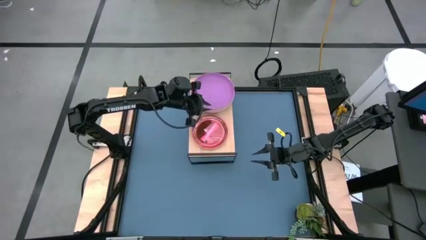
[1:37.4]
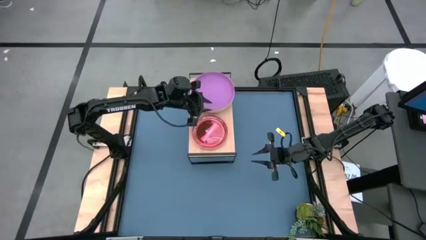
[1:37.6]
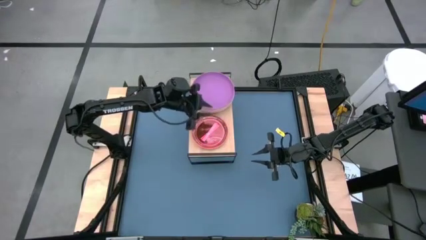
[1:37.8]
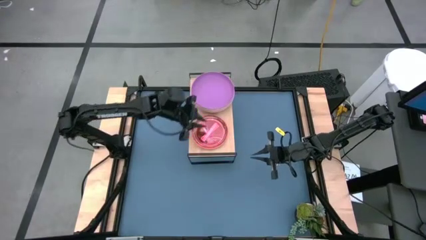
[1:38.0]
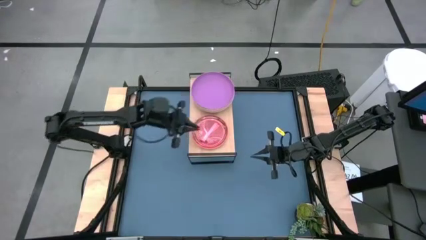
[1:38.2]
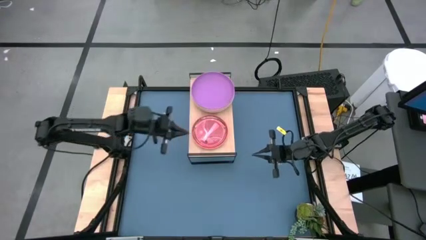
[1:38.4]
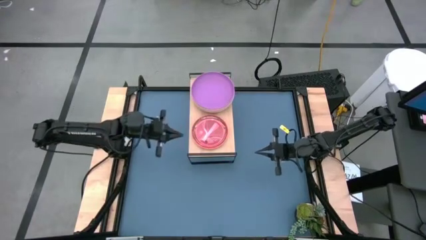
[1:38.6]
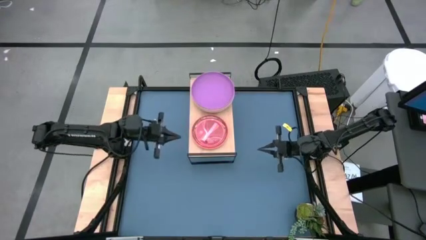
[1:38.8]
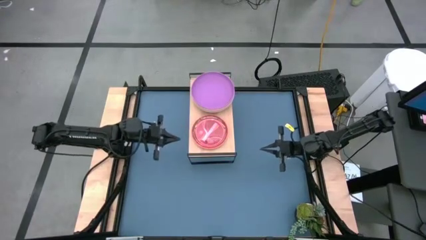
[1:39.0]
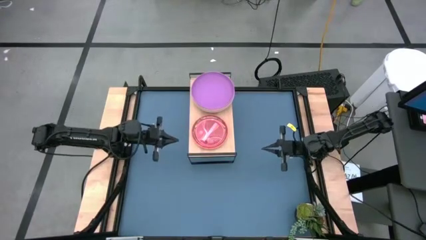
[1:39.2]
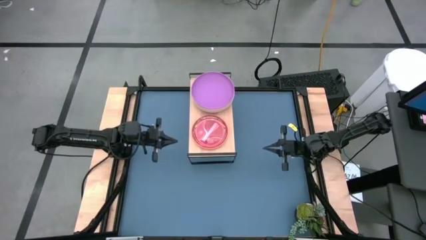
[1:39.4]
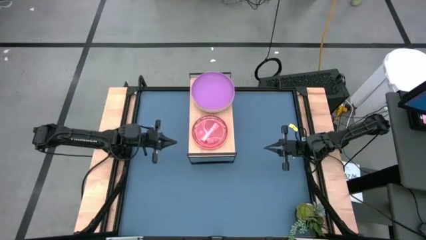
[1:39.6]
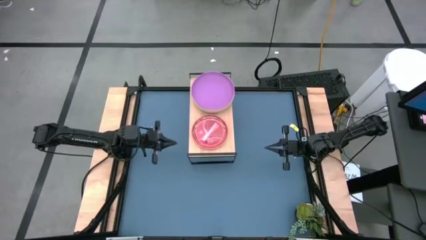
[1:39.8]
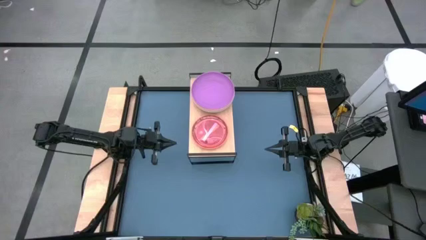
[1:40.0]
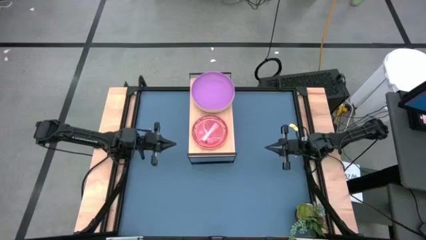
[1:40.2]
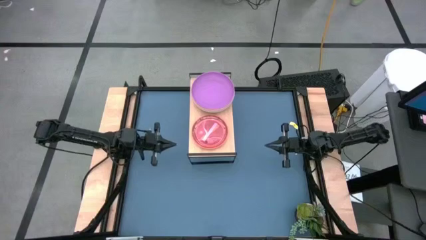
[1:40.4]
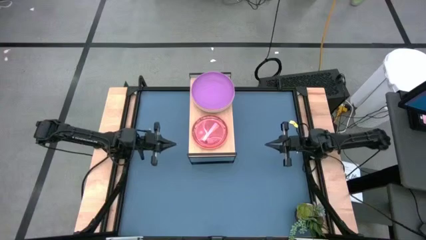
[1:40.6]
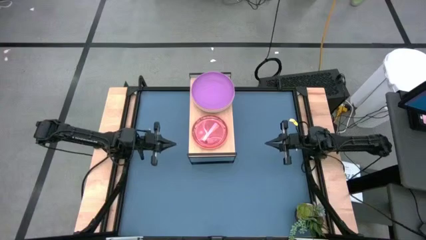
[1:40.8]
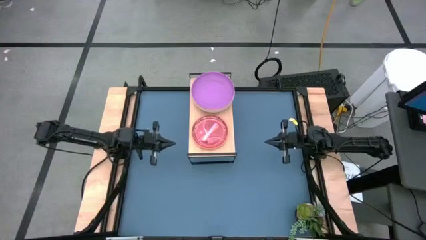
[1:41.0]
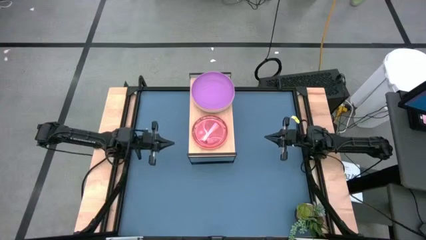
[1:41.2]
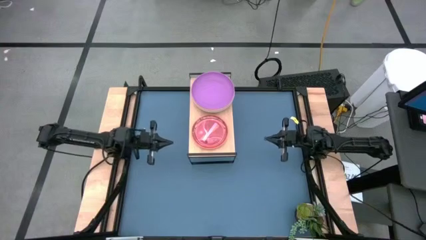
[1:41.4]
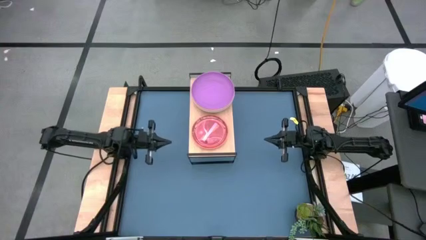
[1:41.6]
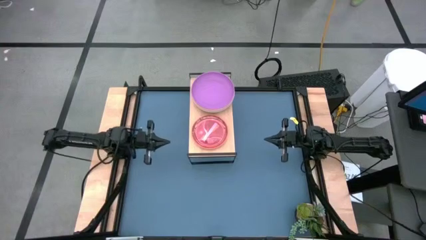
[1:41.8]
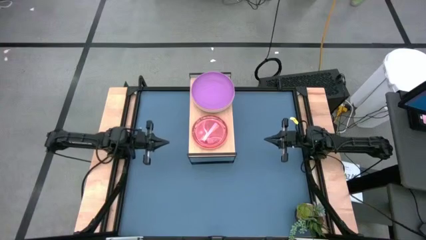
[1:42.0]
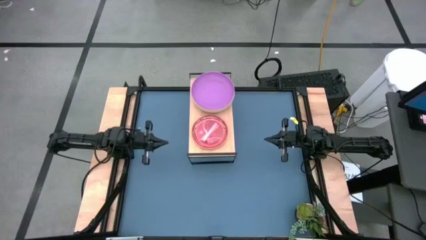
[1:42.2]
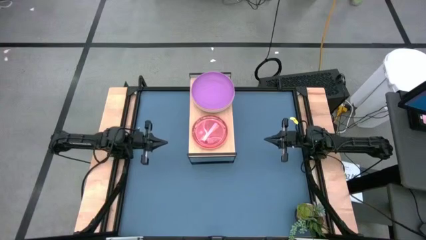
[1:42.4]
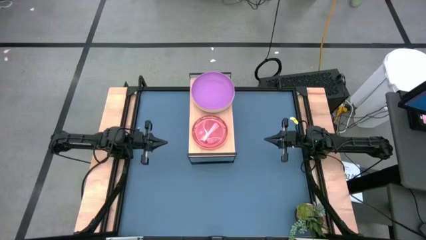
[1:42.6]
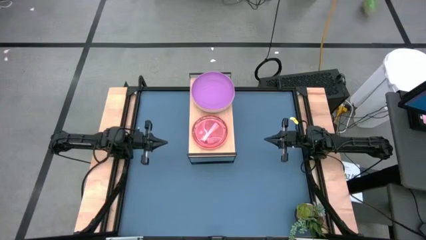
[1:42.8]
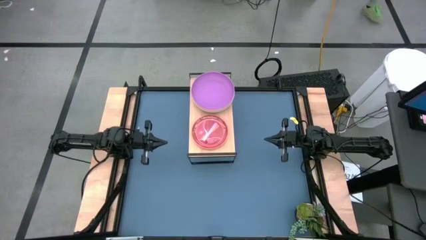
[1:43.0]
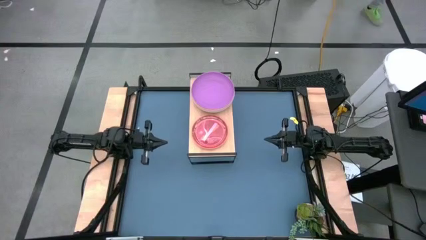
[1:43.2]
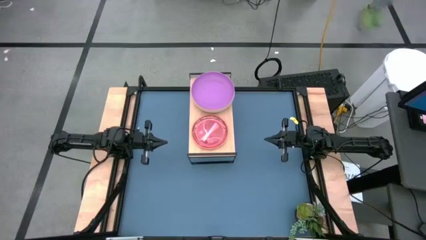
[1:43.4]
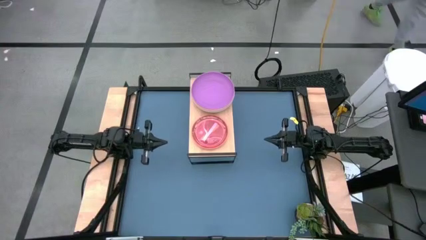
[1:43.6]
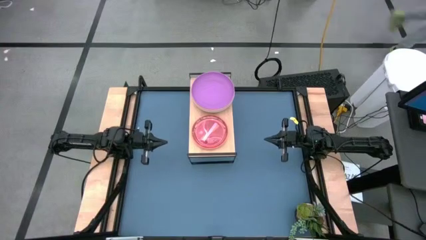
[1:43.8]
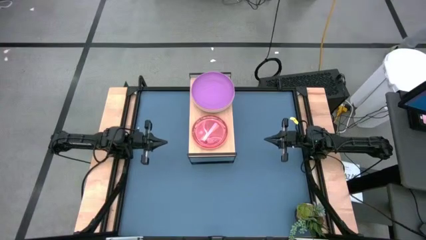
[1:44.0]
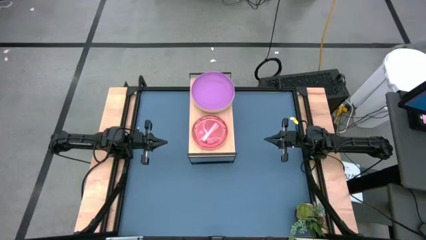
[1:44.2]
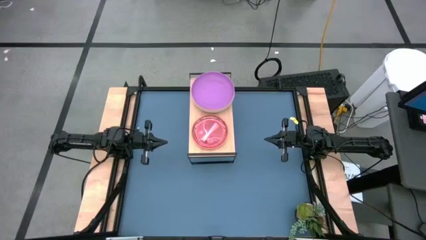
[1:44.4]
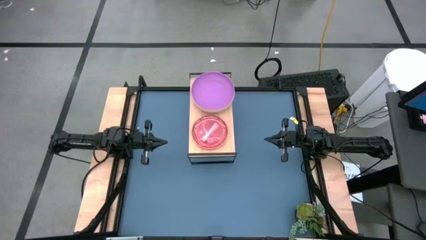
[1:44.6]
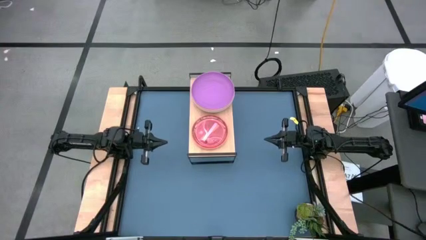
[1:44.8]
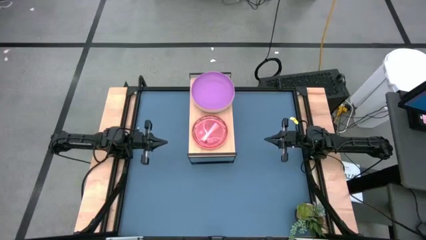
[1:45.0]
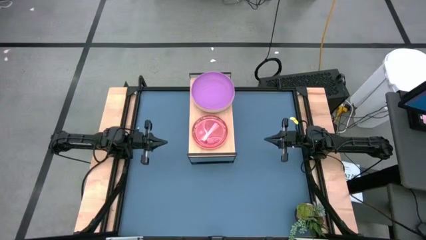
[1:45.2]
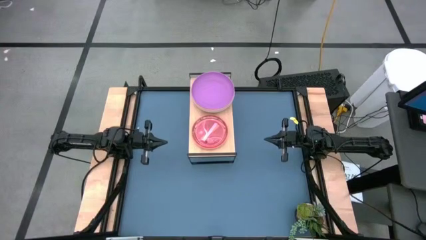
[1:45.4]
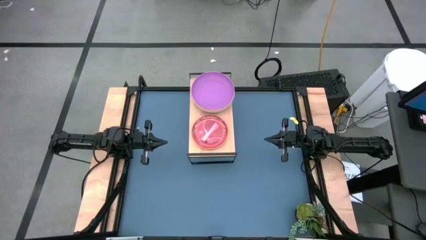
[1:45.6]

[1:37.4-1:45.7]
Task: Place and stack plates onto a shelf
Return to Home Position

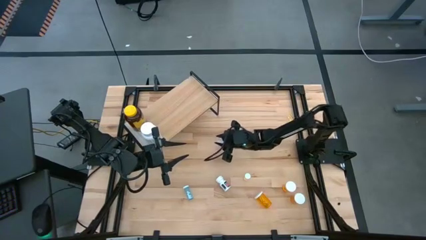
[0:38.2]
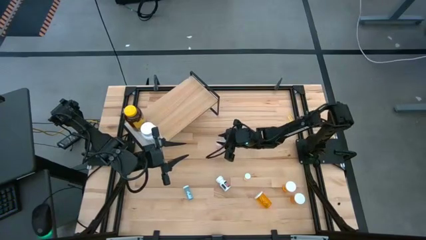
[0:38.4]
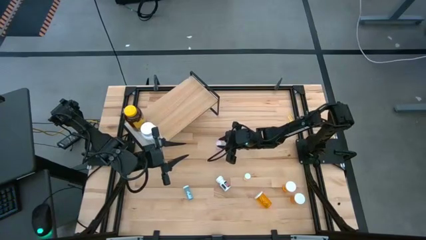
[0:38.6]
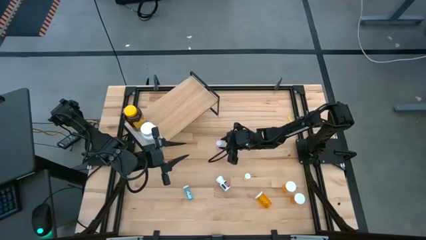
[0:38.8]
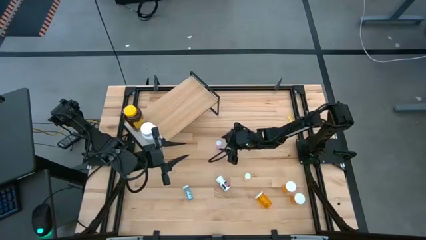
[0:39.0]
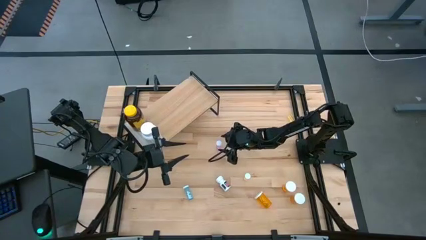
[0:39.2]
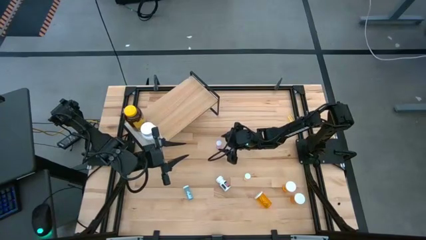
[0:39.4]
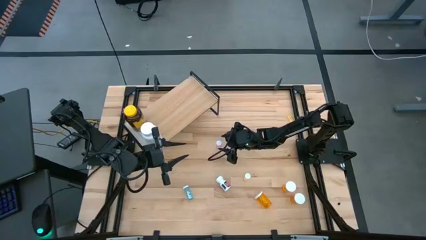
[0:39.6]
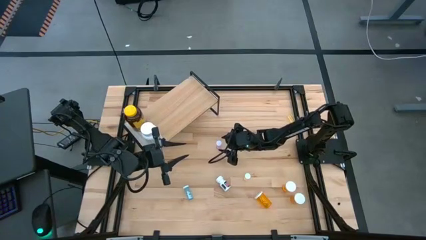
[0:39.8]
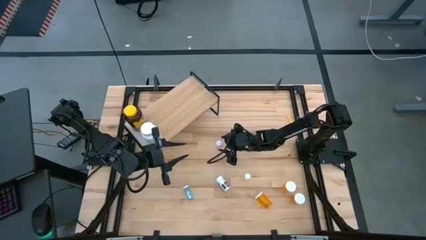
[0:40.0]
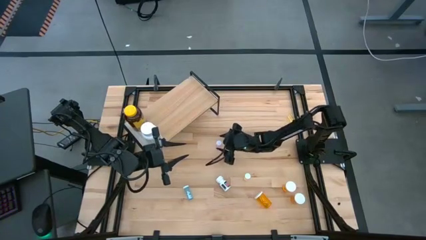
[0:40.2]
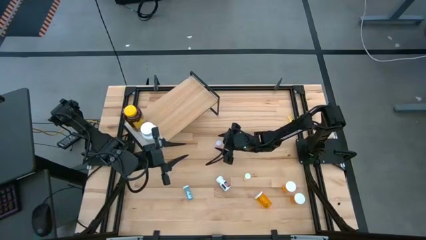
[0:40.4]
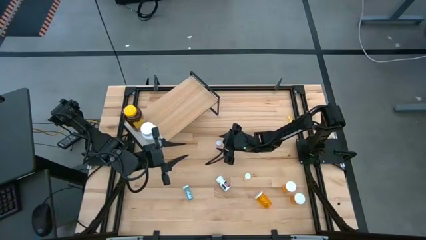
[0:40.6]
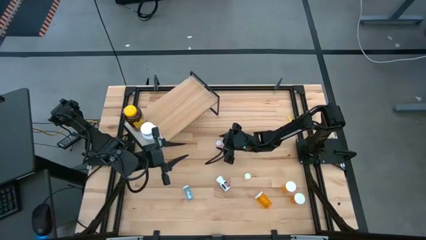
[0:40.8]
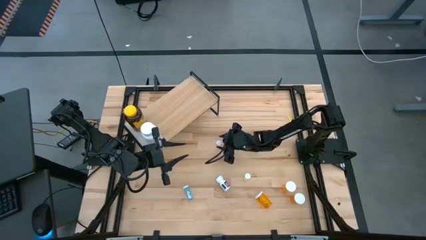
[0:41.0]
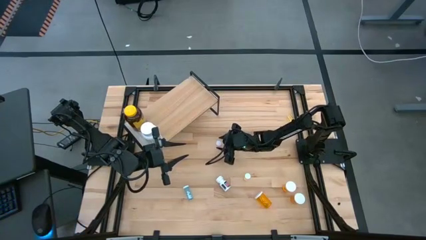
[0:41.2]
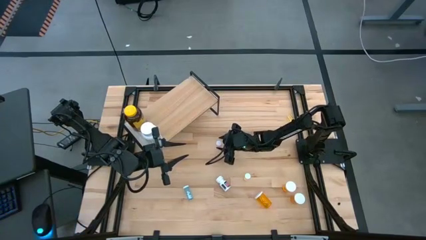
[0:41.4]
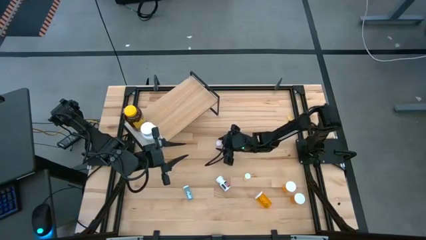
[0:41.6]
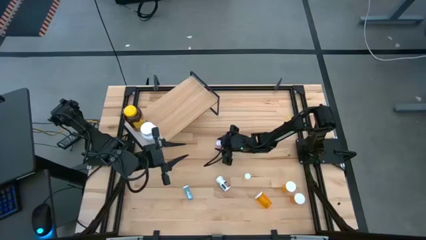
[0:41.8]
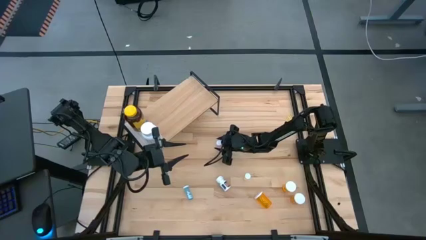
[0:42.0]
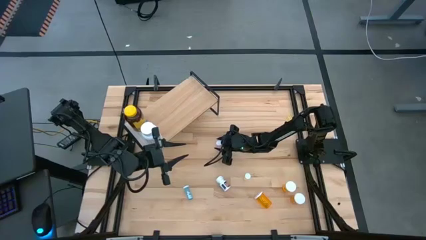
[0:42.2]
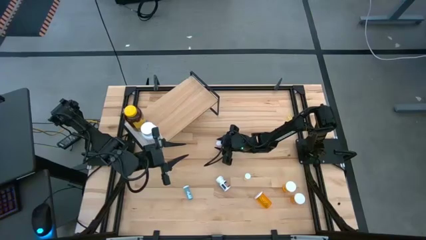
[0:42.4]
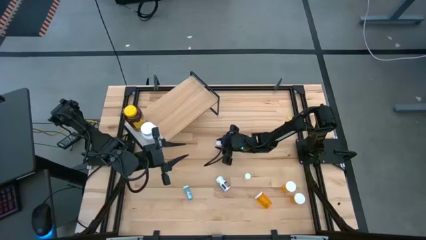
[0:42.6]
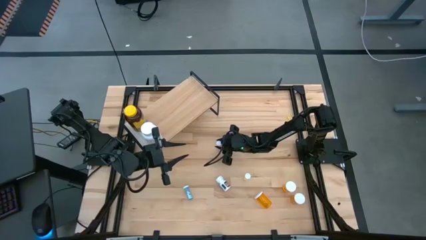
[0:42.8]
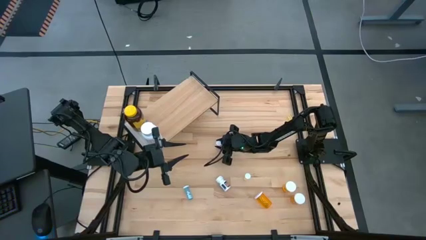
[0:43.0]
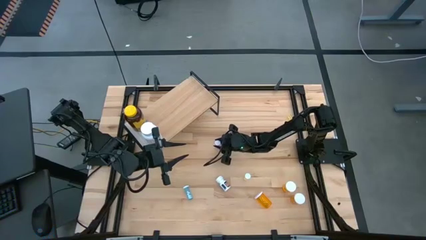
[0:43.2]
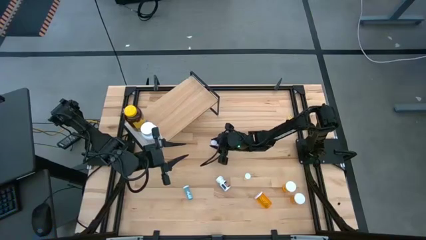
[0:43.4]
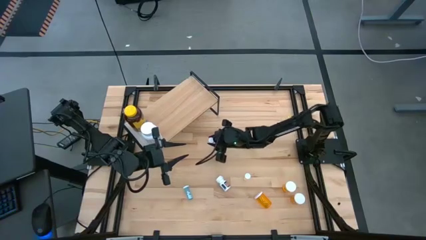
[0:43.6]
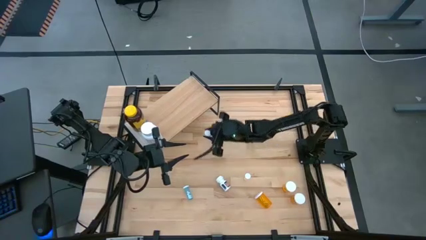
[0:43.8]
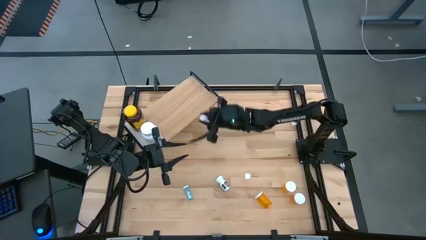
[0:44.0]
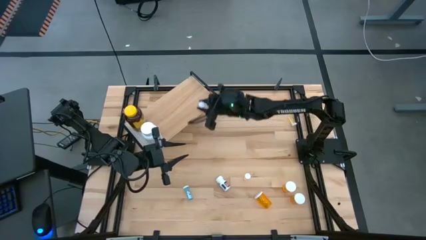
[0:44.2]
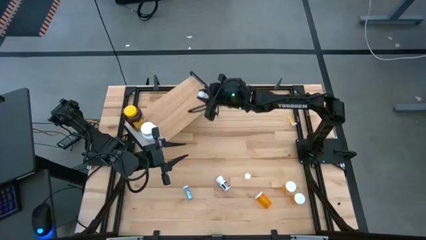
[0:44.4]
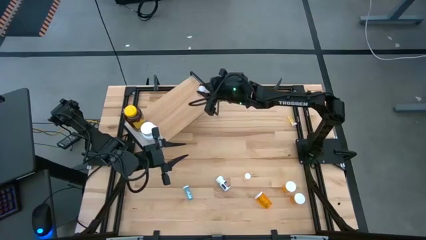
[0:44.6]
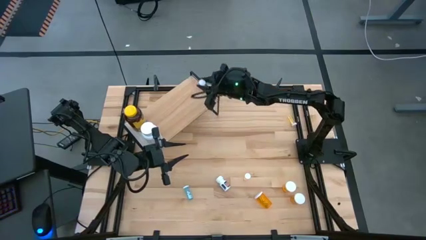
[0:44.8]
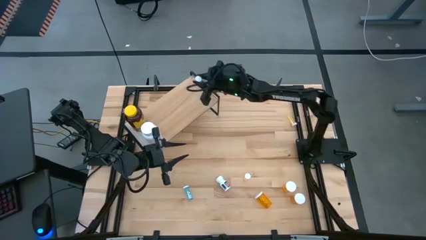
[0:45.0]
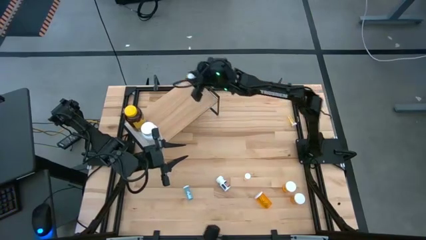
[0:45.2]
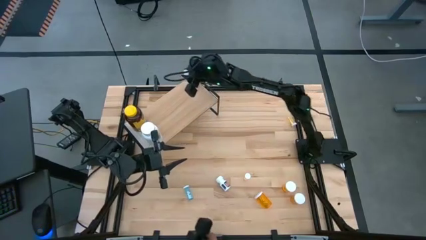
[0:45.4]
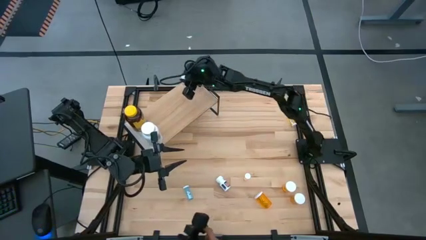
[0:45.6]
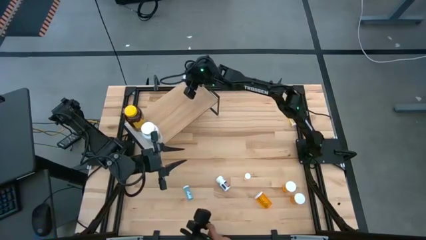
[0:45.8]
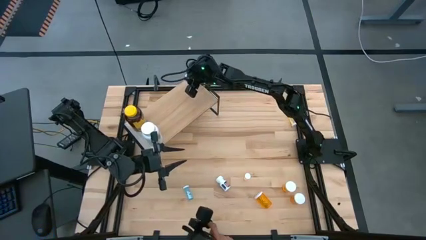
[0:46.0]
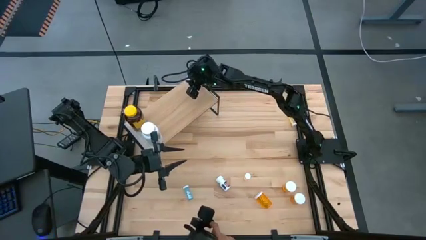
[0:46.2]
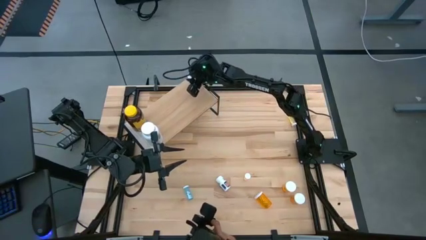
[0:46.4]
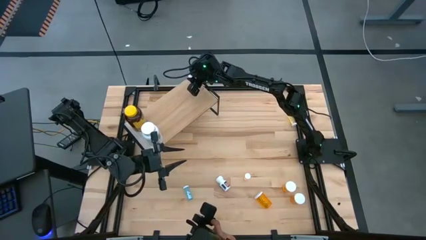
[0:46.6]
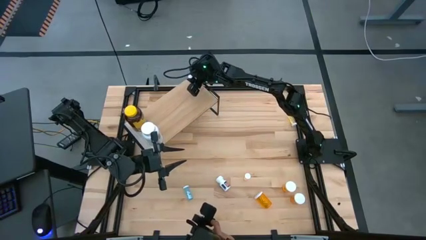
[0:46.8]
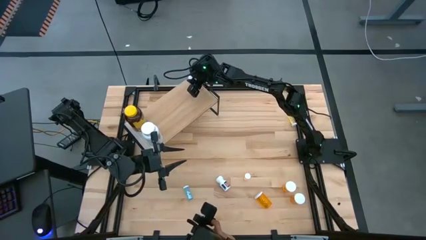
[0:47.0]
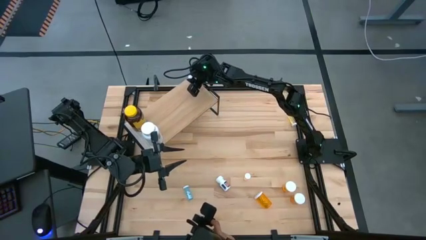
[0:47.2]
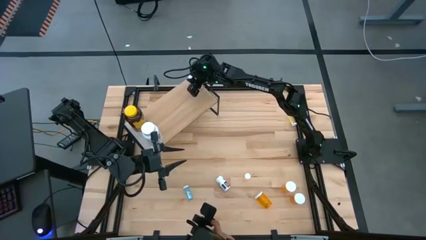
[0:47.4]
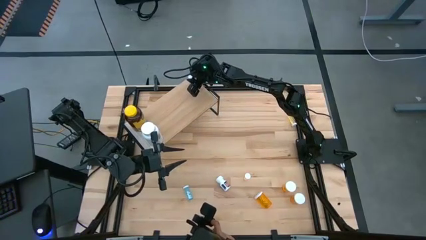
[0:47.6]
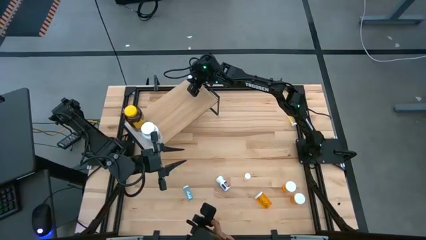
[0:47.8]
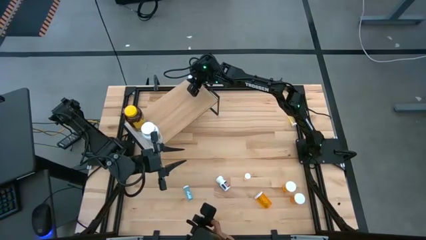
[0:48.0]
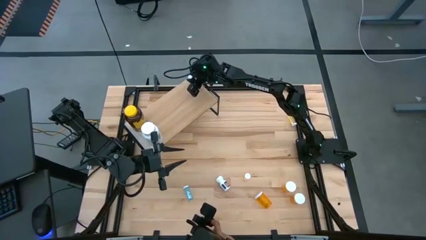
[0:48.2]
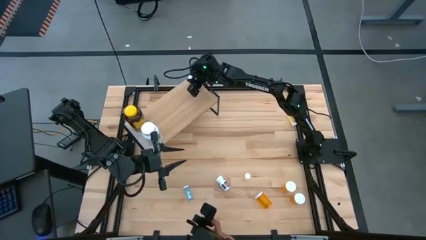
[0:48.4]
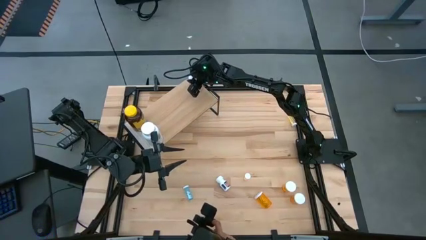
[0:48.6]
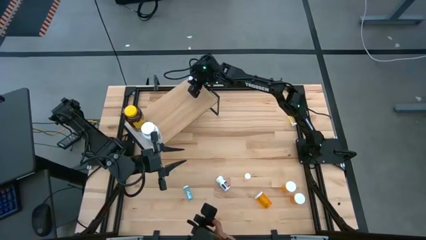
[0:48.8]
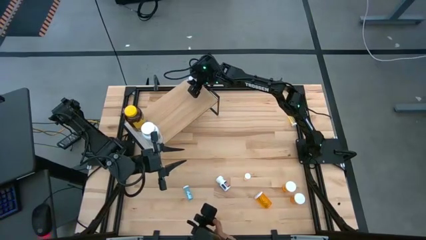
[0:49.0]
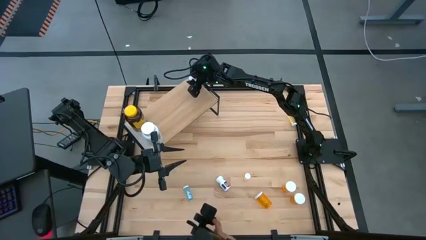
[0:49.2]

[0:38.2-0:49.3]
Task: Pick and place medicine bottles onto shelf by color
Put the pink pill bottle on the shelf
